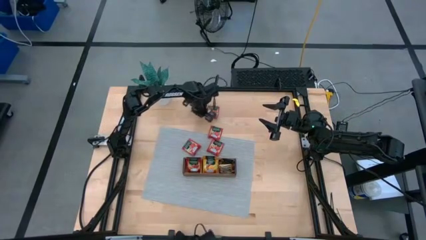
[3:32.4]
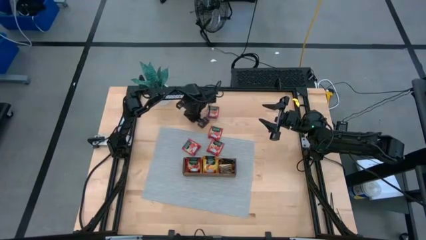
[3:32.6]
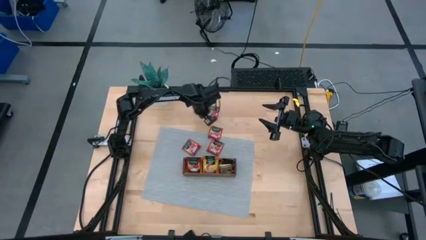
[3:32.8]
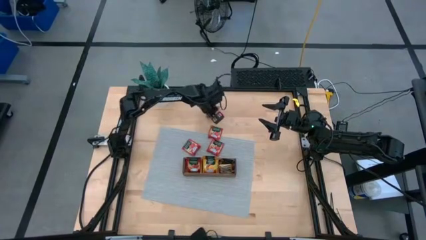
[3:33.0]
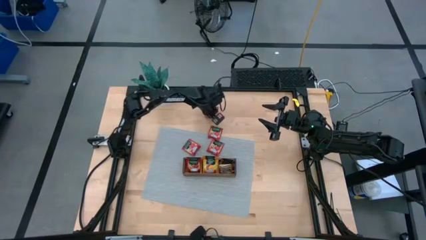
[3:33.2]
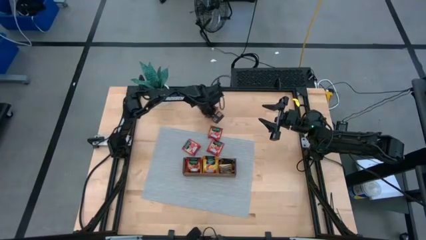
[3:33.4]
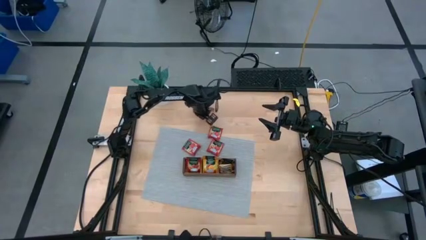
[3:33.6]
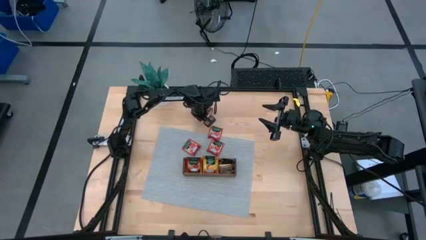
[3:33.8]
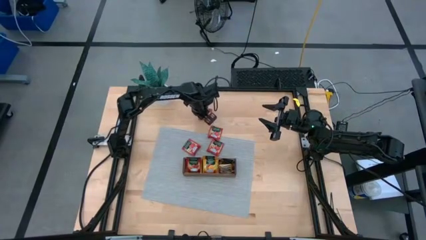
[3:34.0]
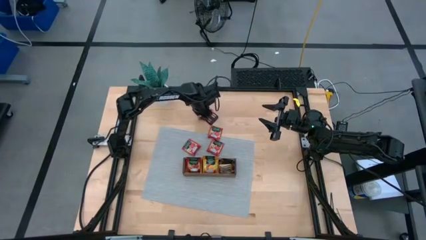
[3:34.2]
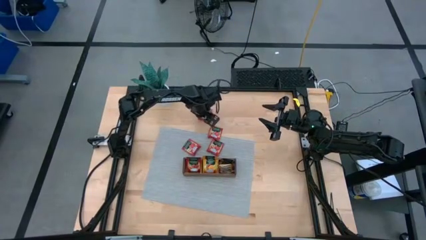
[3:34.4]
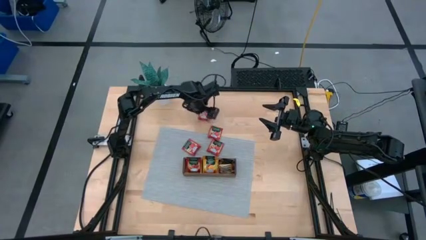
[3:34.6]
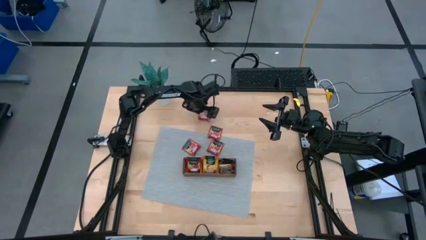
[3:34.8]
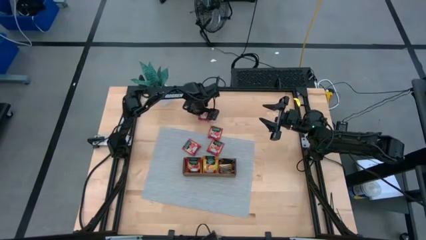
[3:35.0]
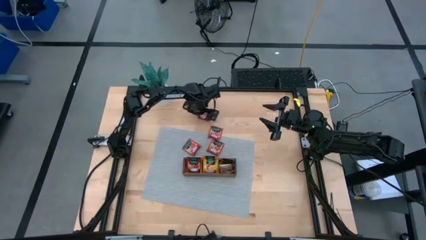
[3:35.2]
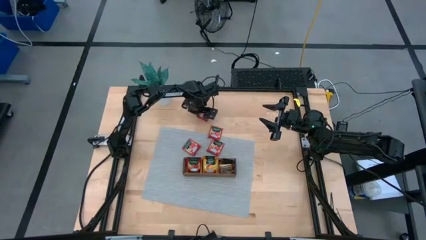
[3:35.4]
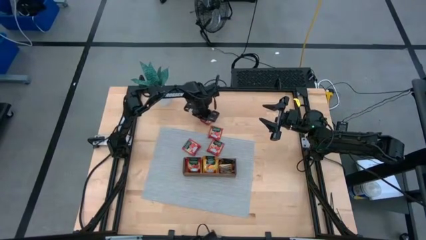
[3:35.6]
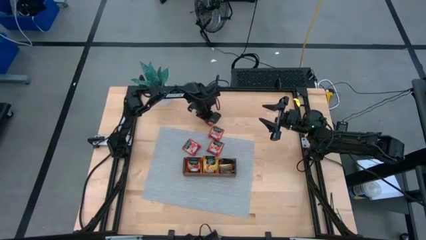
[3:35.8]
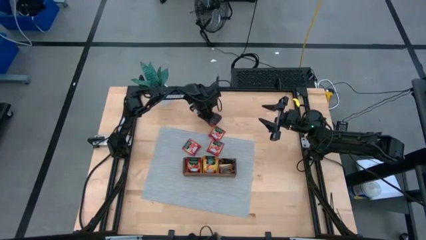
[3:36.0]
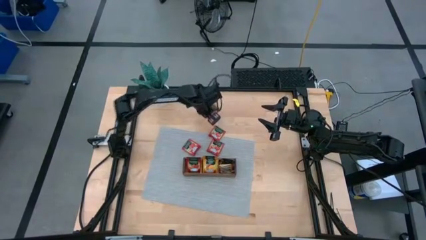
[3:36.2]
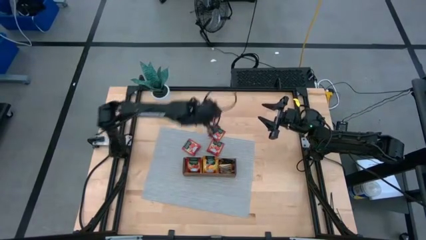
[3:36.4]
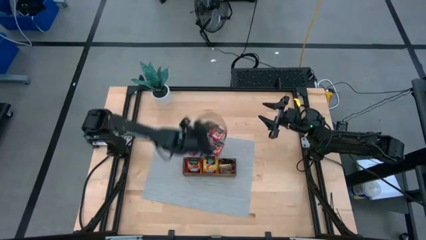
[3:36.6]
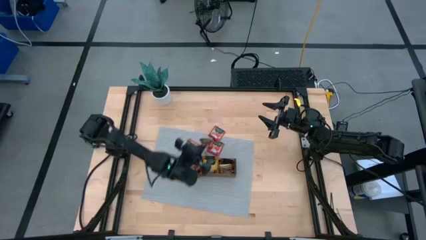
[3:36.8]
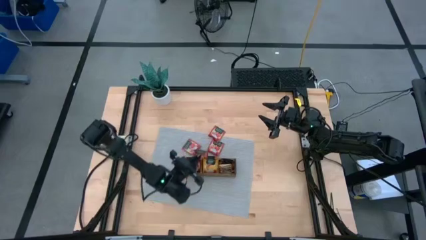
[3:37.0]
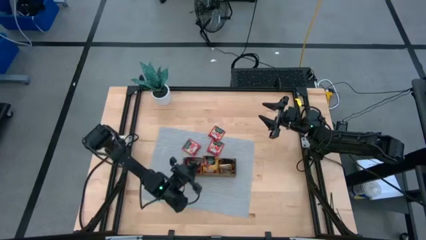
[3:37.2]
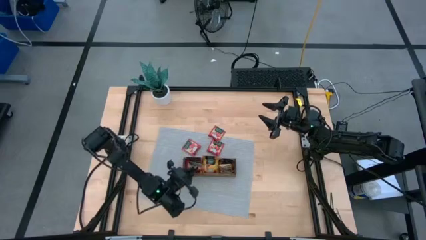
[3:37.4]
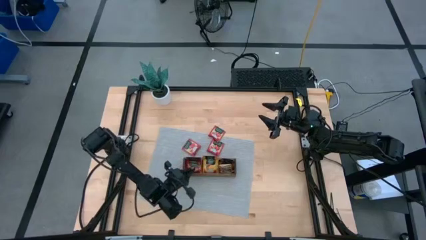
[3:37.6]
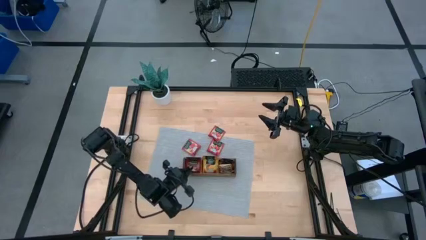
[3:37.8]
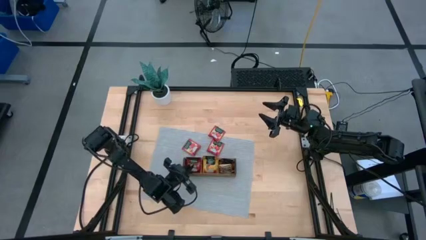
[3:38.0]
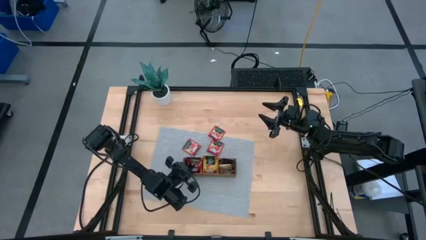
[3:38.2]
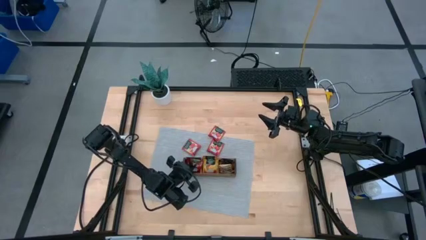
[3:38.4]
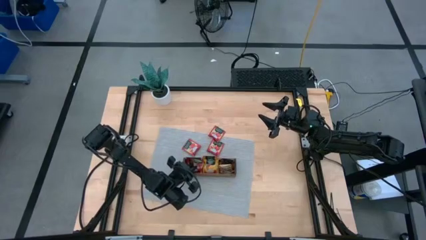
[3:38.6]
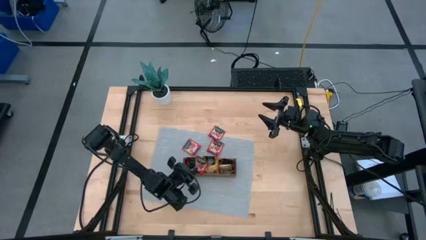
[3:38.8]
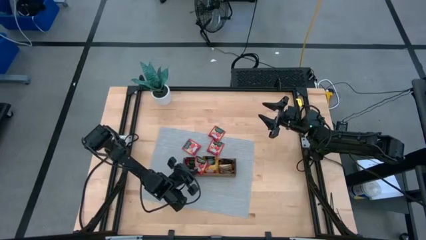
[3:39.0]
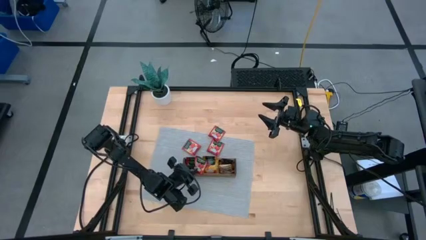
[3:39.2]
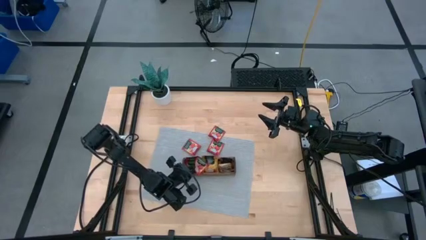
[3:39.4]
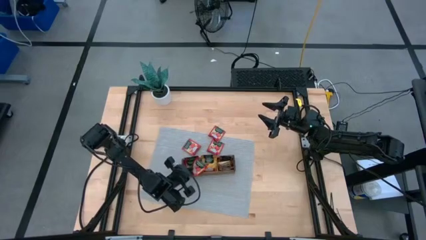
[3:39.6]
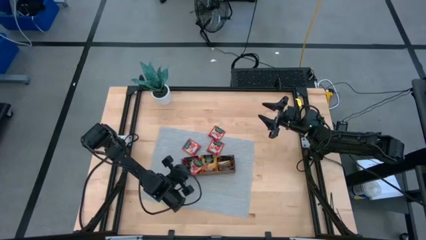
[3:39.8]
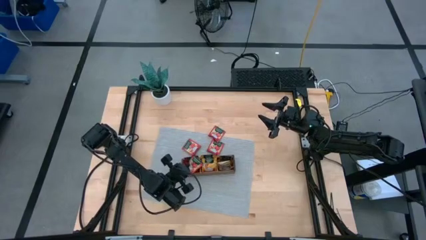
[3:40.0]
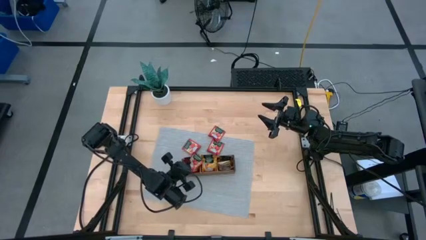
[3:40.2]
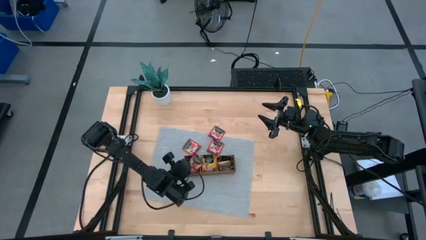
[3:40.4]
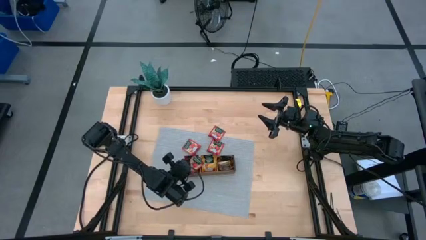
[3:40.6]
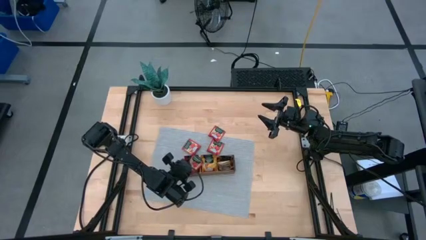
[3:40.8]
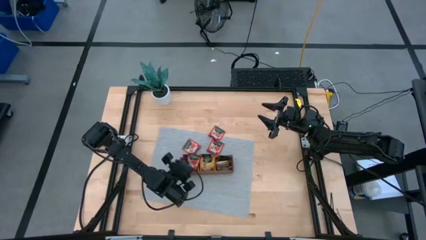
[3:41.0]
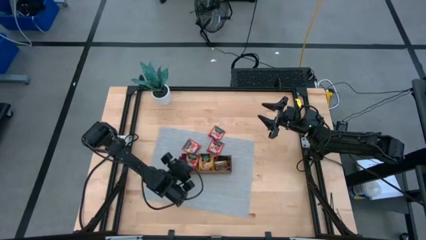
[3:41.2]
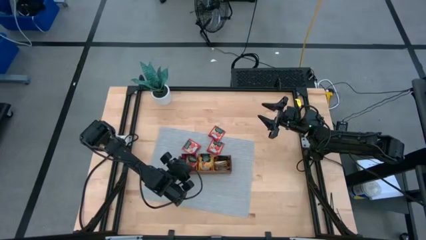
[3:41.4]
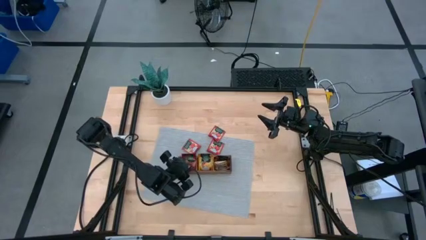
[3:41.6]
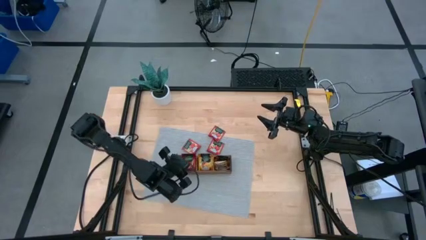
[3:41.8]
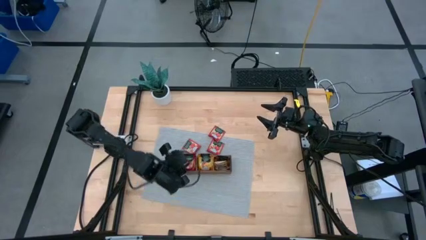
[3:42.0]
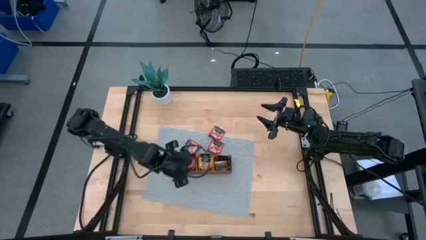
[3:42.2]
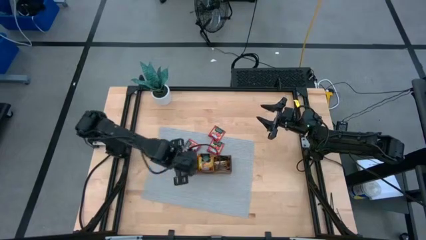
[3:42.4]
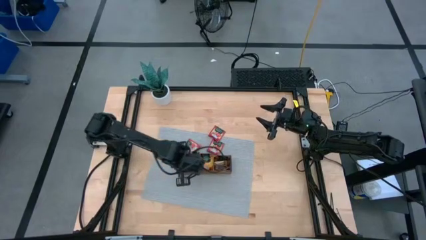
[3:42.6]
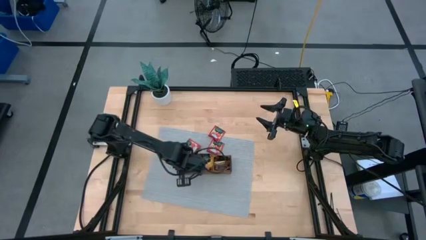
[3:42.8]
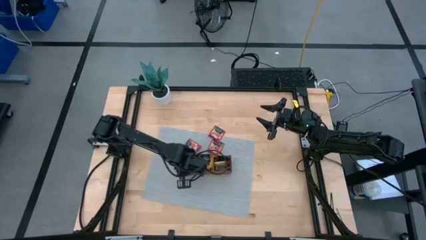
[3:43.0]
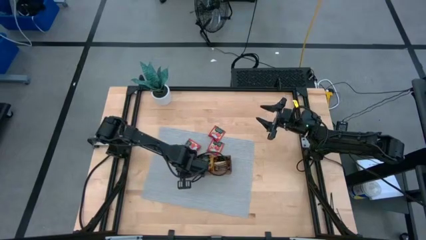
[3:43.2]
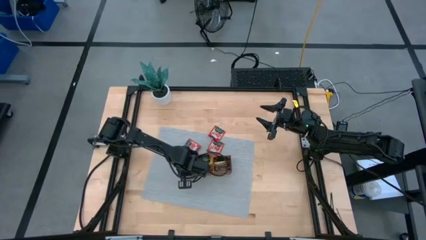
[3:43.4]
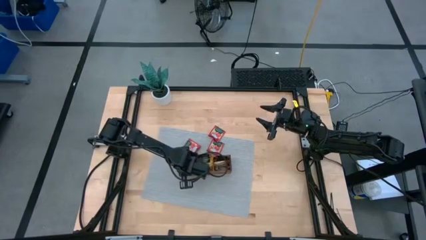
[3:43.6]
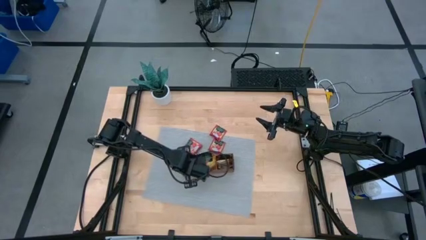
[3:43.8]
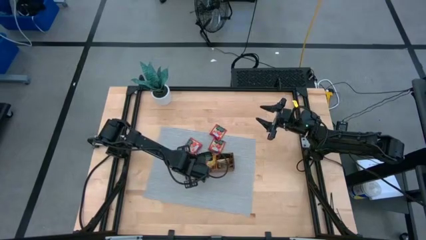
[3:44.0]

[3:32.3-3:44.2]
Task: Pick & Place Tea
Put the red tea bag into the left compartment of the wood organizer

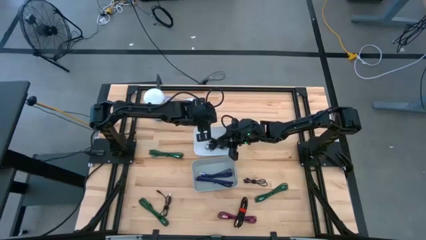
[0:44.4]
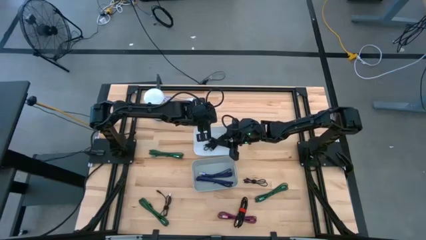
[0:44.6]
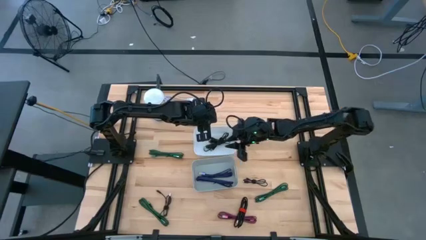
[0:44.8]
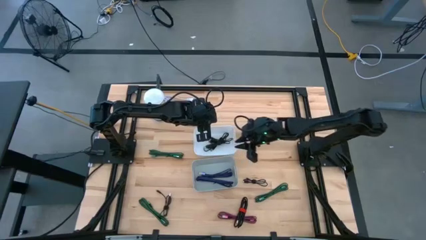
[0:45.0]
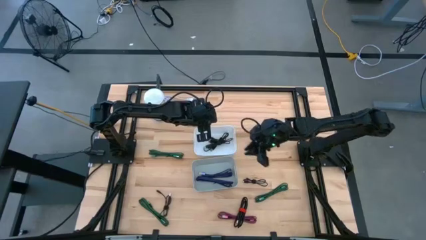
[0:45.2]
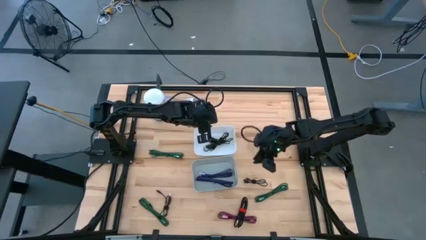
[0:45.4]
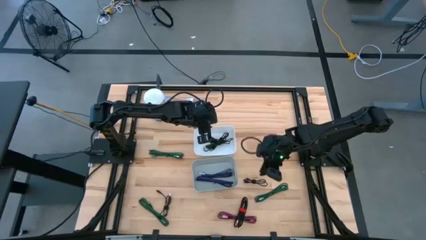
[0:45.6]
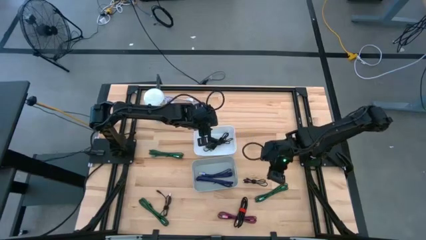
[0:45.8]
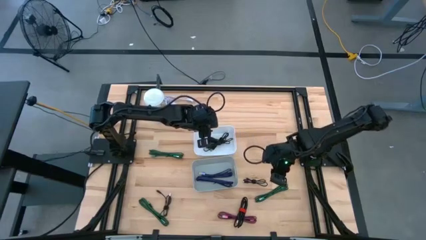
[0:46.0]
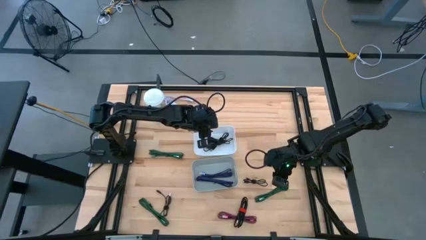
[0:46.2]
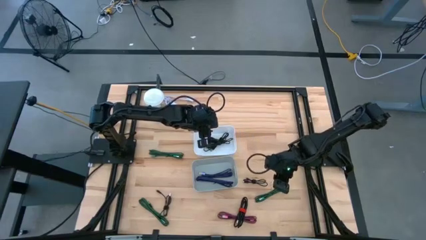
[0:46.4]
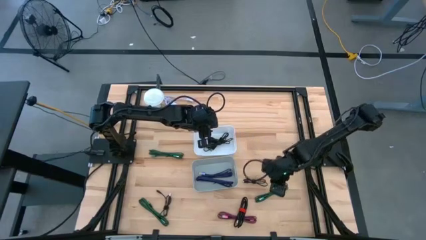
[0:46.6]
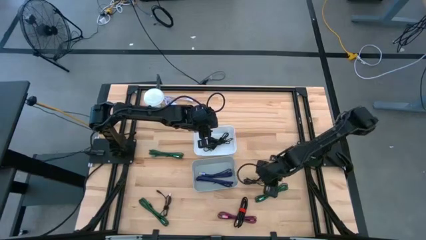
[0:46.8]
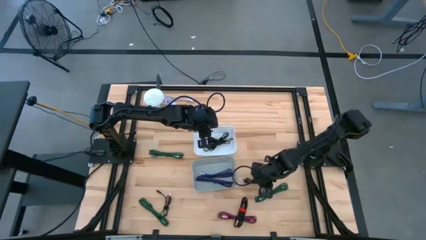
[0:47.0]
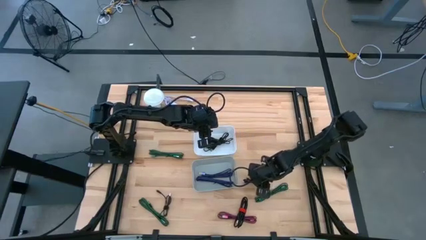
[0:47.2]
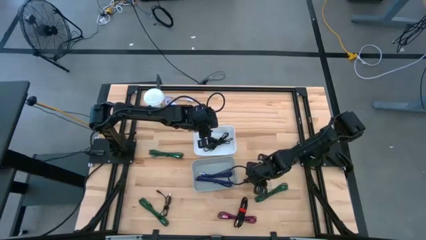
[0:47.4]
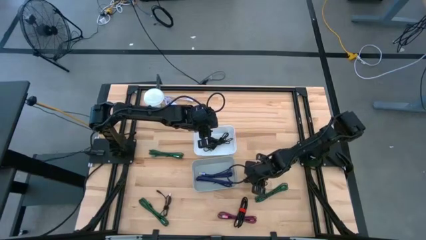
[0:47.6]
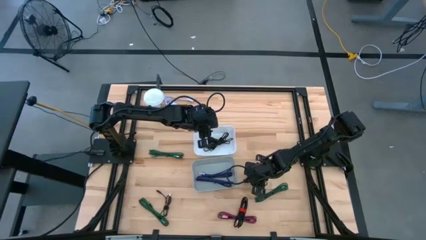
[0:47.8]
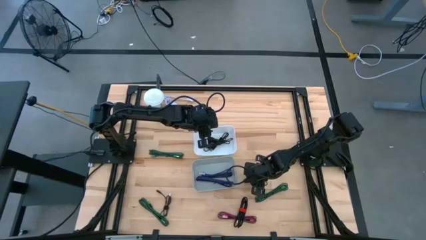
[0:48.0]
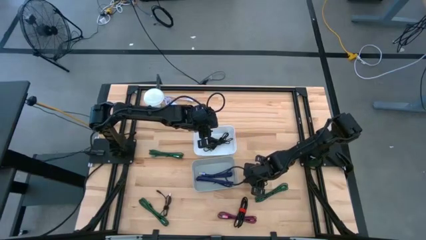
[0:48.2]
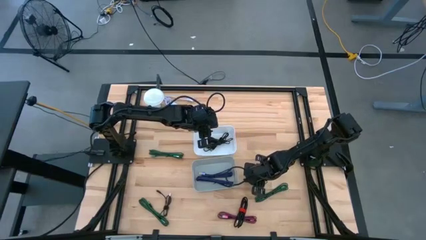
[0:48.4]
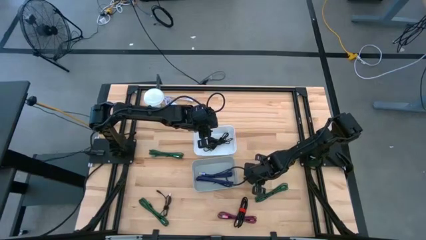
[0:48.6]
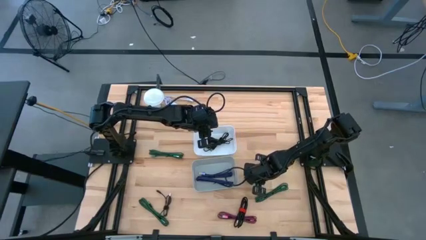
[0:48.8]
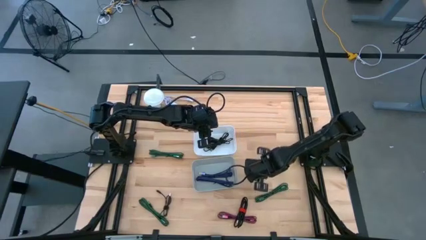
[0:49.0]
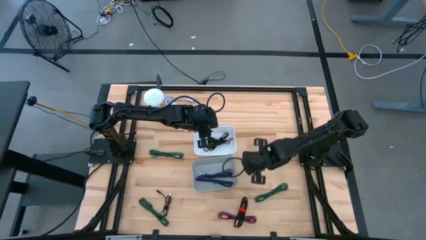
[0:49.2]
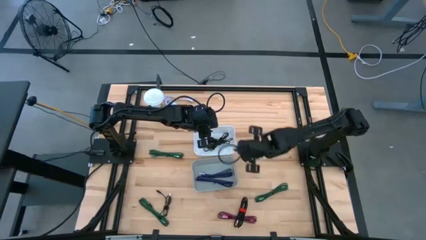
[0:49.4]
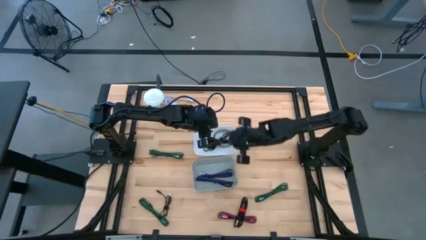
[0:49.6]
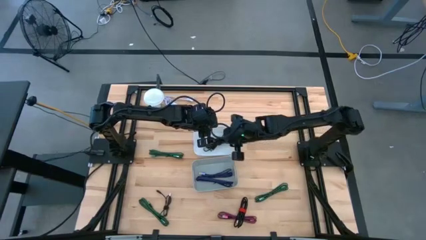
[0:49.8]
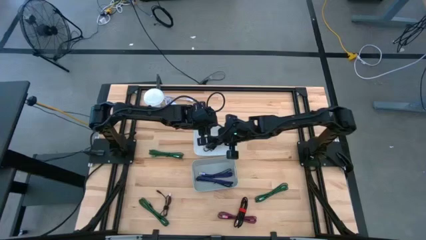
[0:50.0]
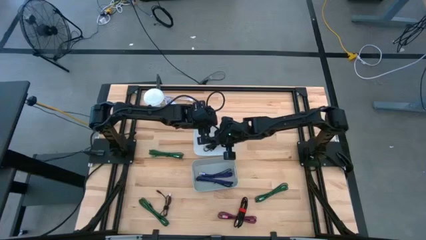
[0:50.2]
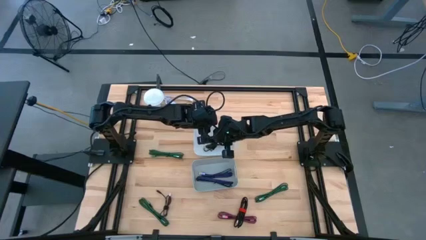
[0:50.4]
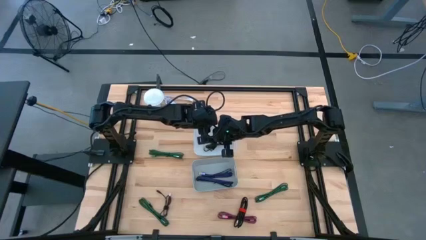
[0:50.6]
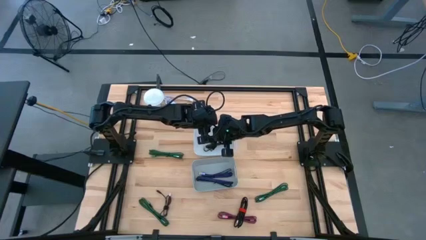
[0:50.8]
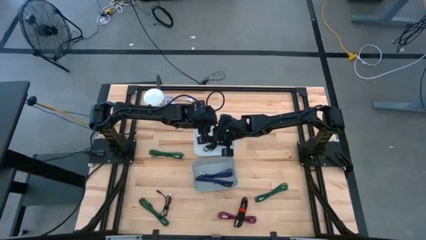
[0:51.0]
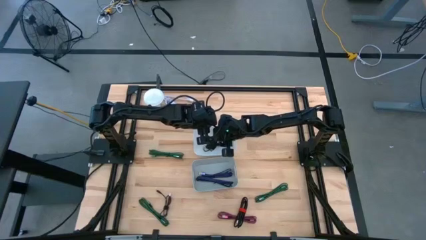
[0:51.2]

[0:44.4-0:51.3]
Task: Pick & Place USB Port
Put the black charger cable into the white container
